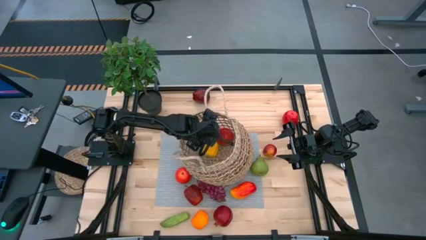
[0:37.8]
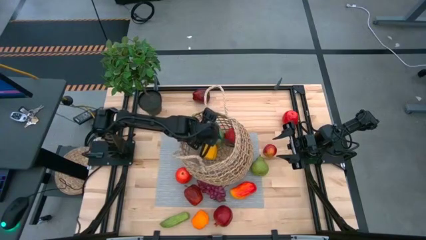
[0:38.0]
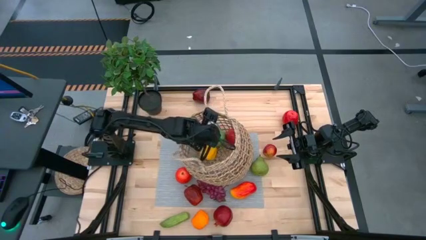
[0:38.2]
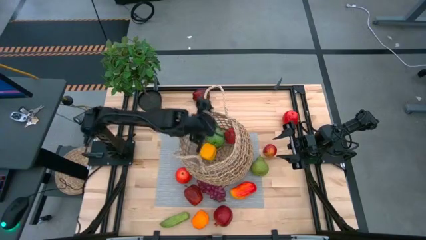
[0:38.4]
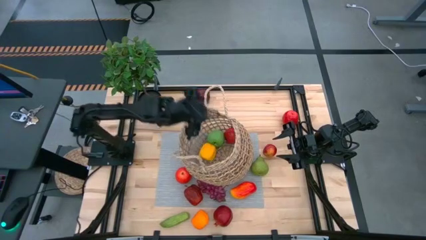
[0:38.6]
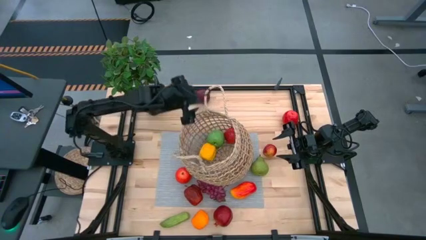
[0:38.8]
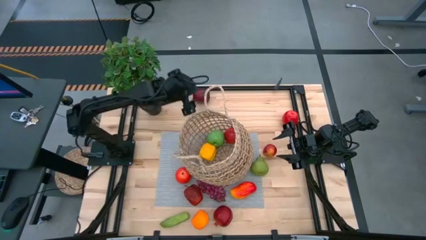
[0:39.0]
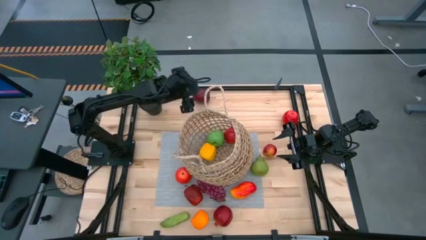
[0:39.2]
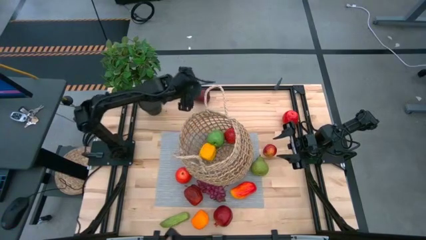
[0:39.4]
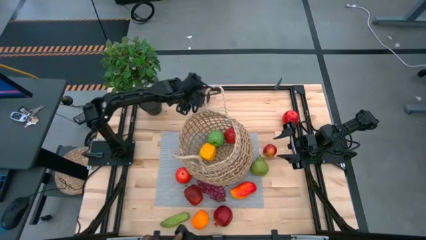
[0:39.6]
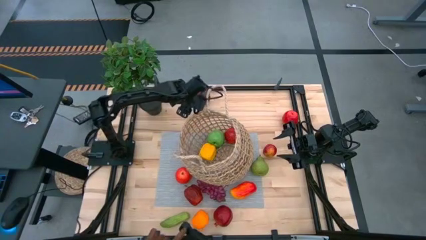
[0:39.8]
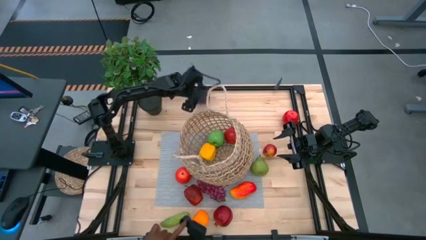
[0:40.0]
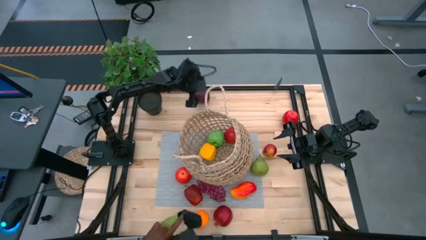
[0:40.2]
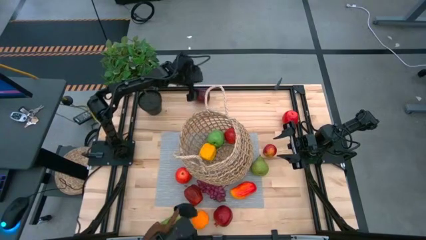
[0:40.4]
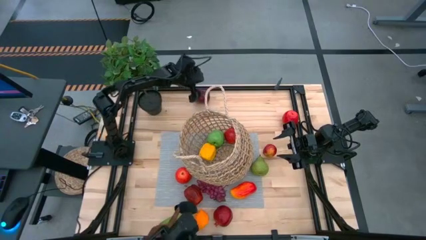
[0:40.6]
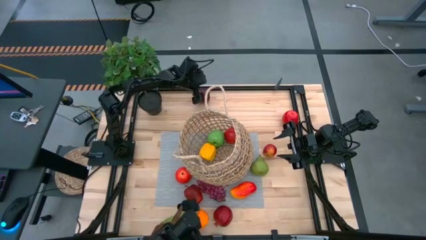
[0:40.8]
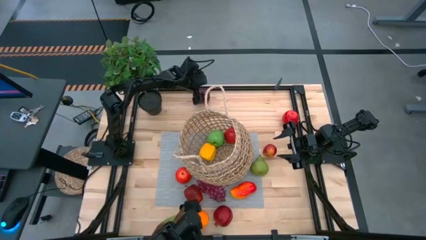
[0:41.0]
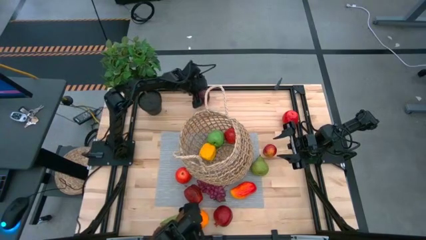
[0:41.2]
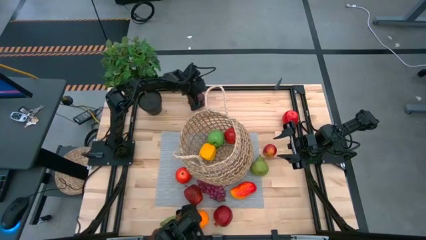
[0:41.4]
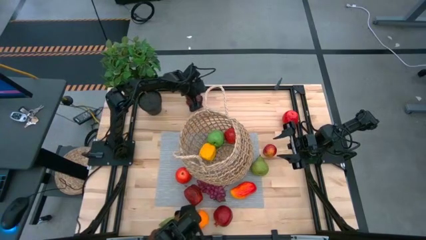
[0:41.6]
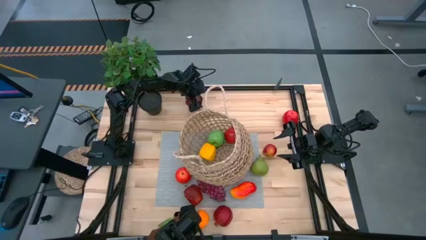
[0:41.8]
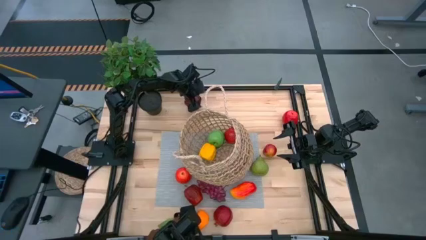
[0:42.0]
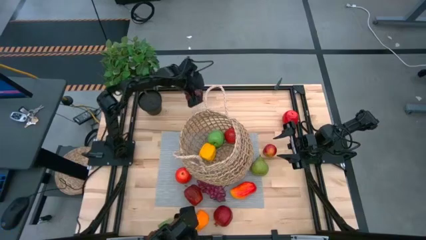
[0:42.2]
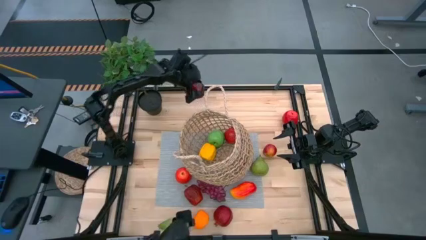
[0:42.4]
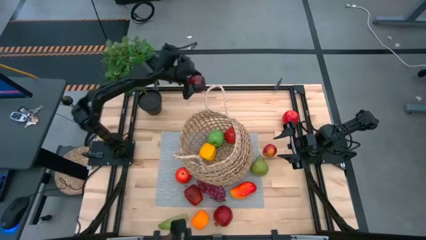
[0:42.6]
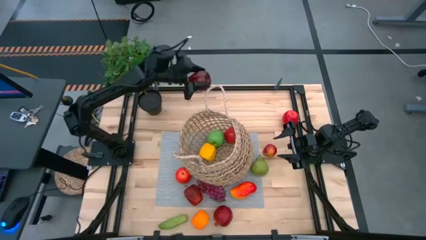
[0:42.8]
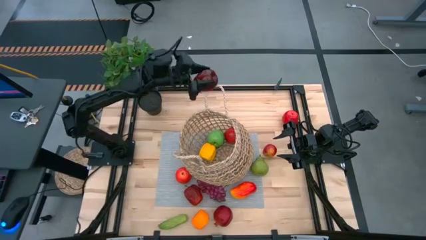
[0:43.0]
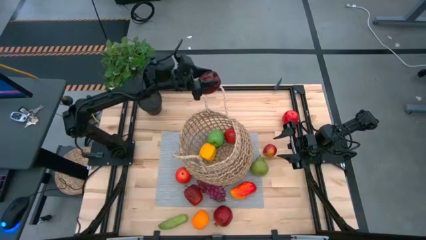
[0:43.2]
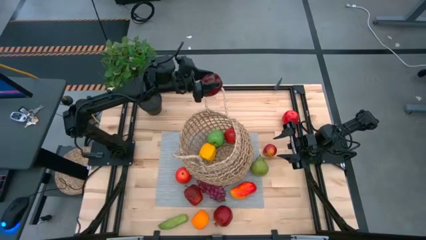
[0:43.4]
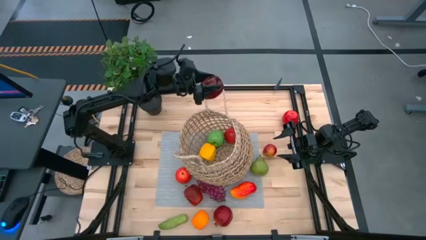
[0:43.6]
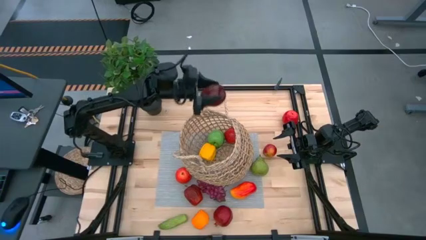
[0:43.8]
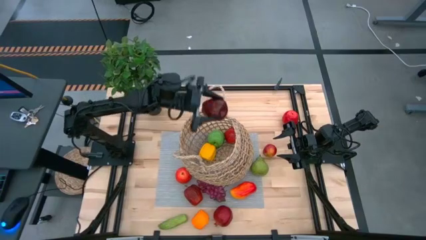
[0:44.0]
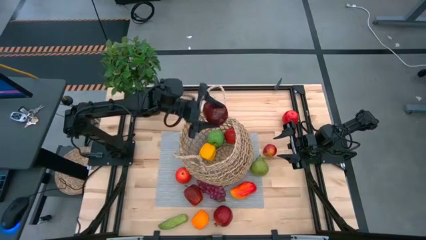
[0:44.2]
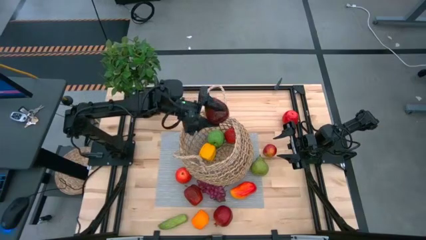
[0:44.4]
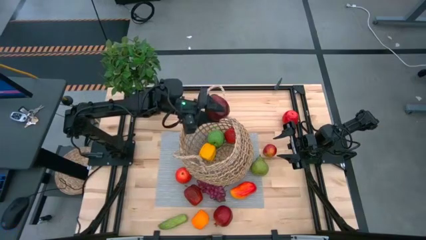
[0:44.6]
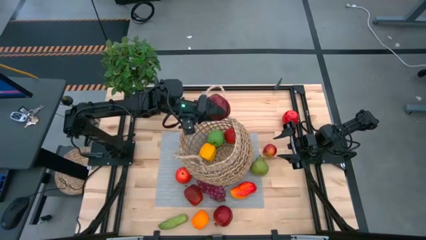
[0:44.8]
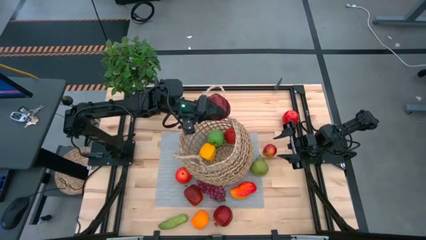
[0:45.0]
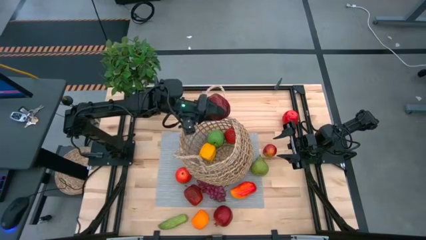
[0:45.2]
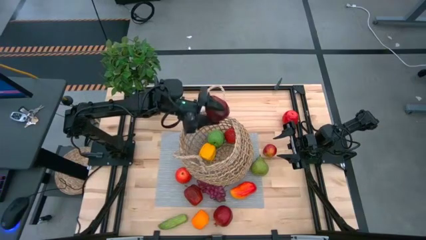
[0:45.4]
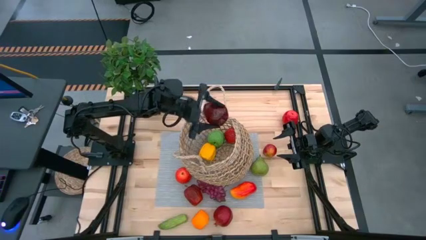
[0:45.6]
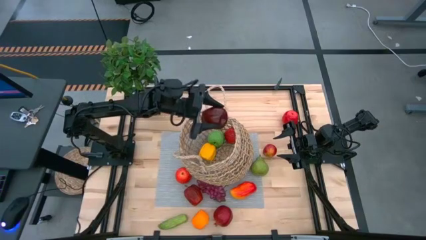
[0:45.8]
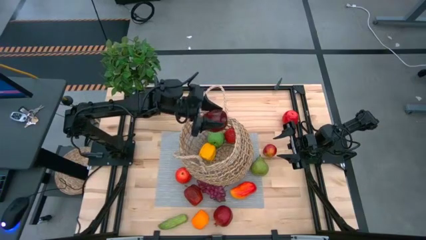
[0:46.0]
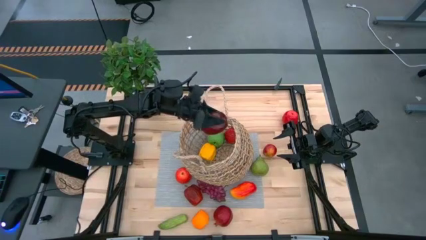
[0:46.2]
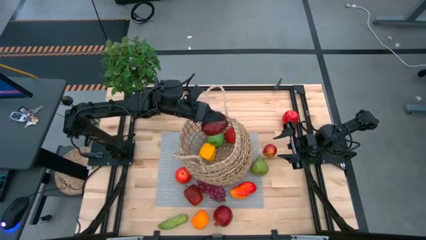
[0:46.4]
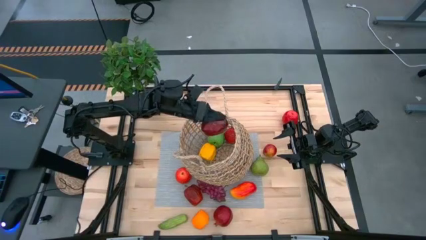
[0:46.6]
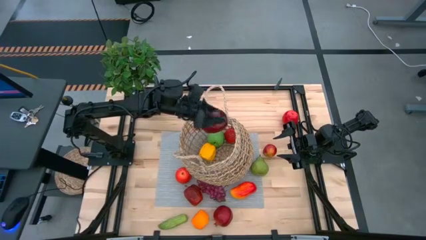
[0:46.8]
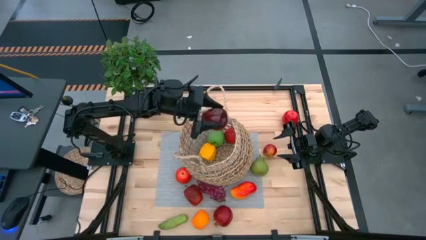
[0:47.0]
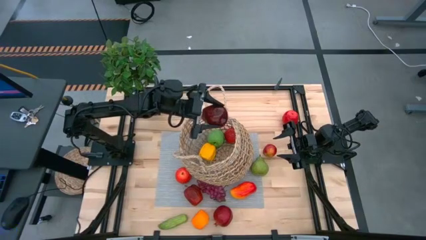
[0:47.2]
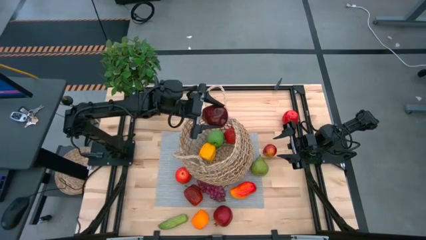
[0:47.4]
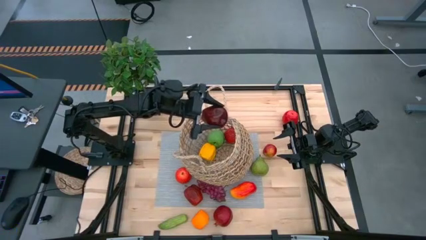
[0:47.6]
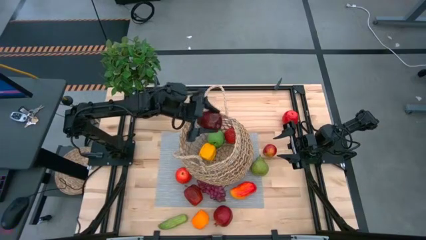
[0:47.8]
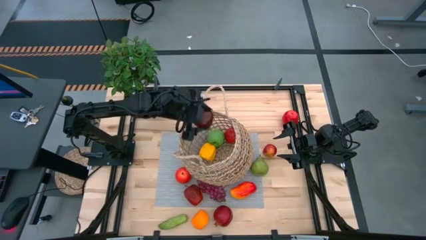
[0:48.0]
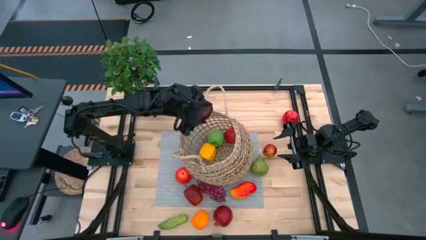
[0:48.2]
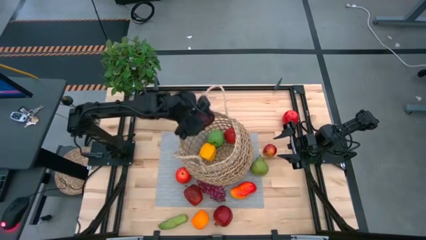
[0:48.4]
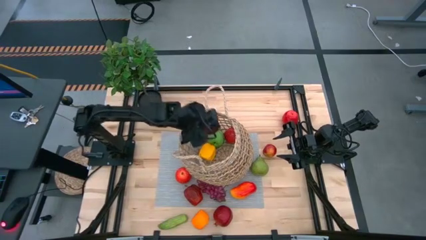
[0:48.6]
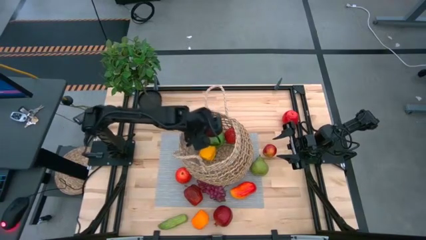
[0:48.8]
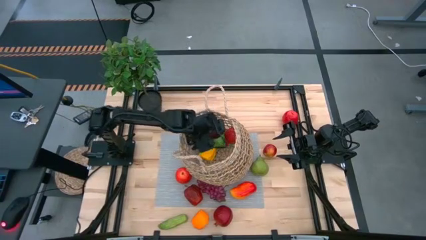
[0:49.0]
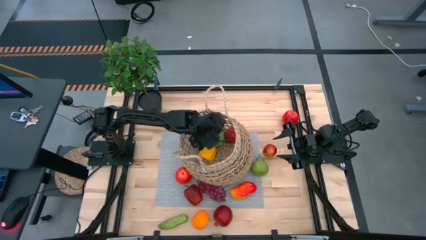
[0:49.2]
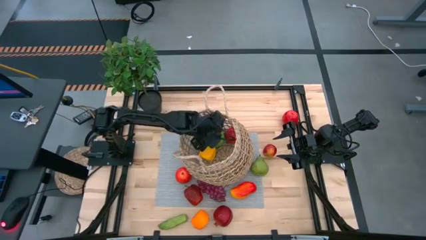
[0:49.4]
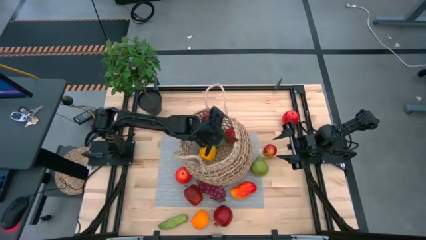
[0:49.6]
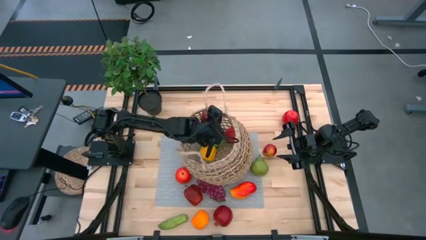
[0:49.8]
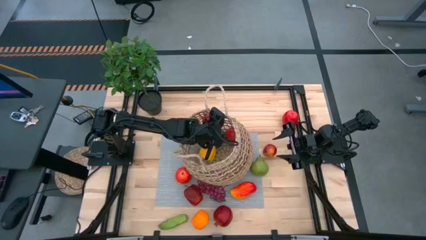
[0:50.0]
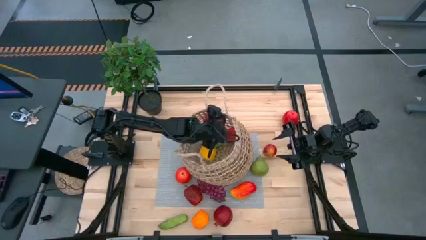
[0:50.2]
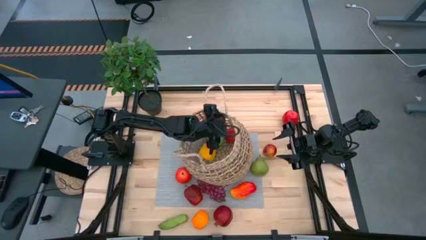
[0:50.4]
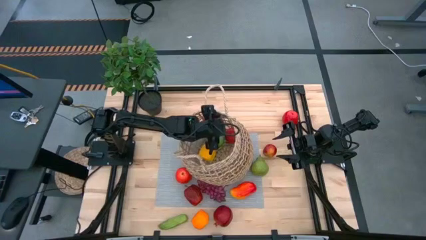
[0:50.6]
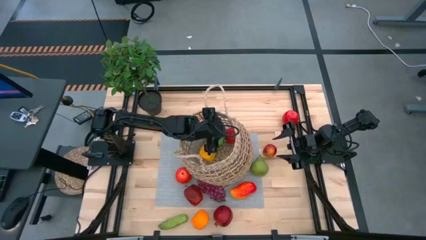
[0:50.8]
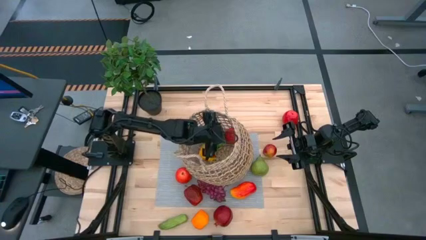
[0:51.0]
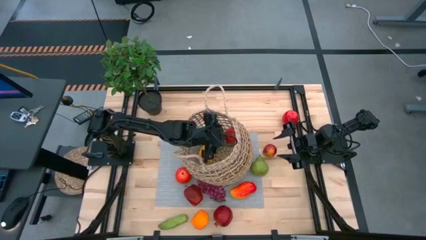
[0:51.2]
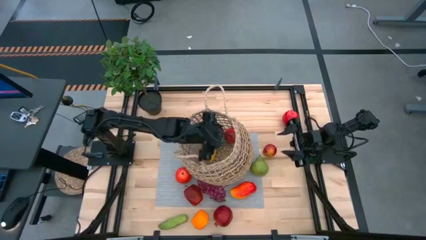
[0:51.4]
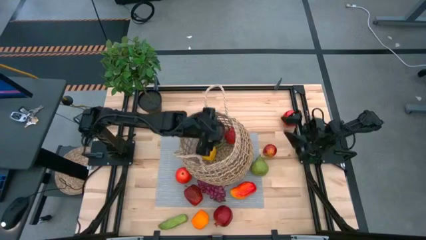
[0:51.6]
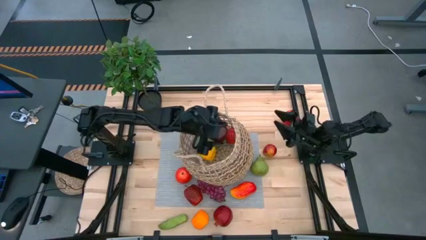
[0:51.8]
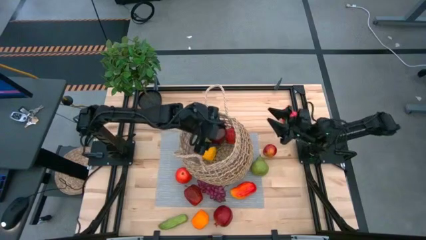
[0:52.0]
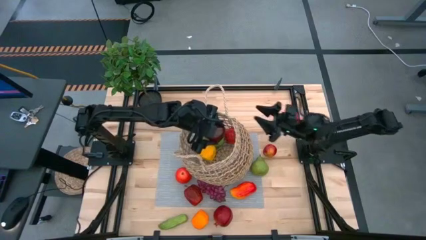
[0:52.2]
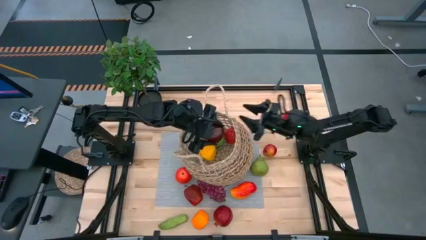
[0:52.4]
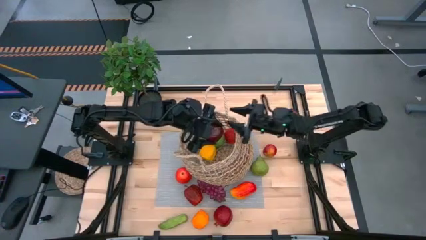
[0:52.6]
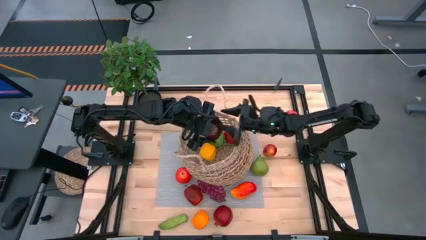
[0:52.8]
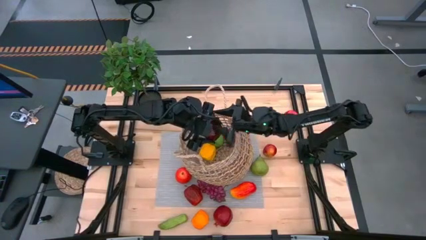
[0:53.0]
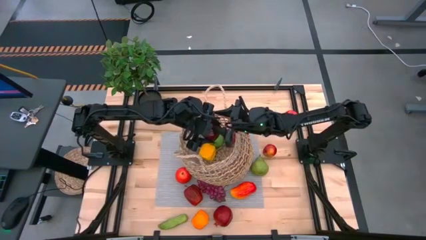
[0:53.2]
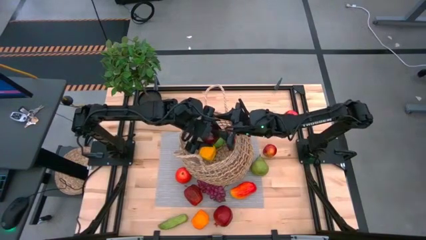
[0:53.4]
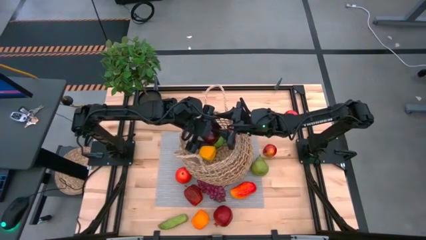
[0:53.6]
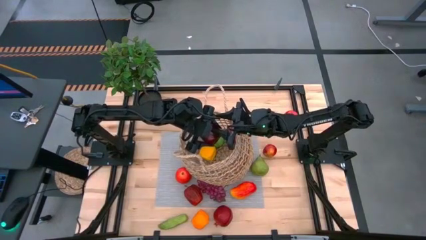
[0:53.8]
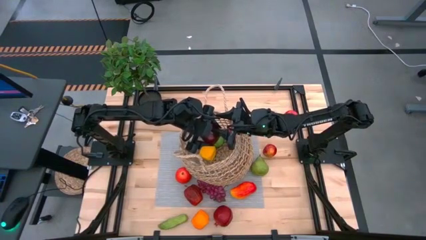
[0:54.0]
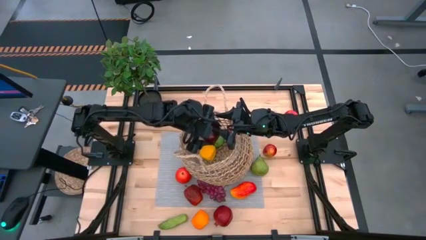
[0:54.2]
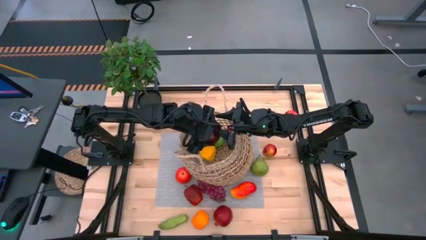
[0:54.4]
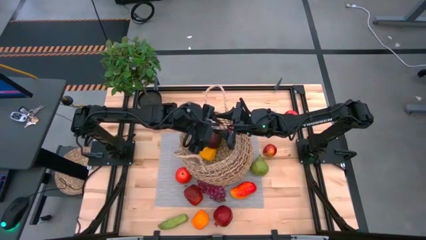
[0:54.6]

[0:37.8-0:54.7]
Task: Build produce basket
Put the red apple into the basket
